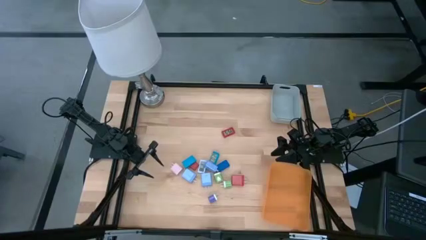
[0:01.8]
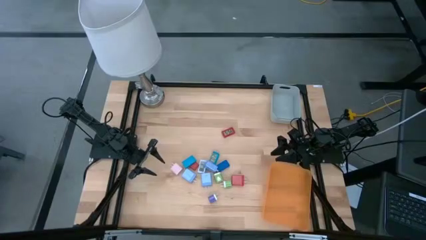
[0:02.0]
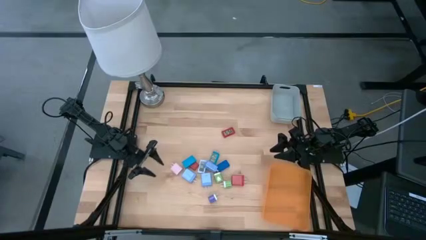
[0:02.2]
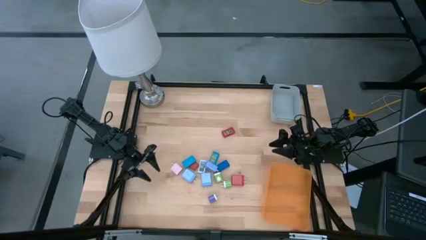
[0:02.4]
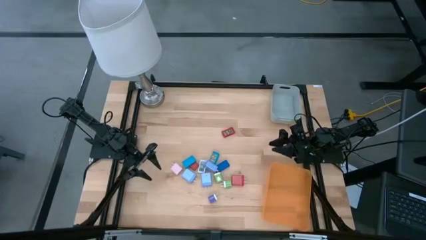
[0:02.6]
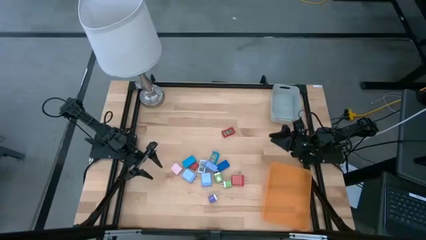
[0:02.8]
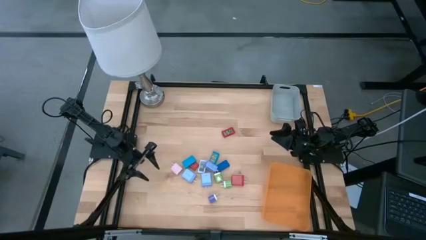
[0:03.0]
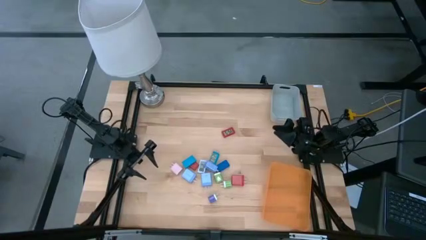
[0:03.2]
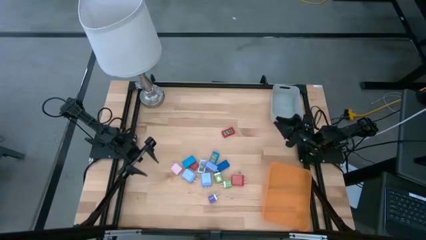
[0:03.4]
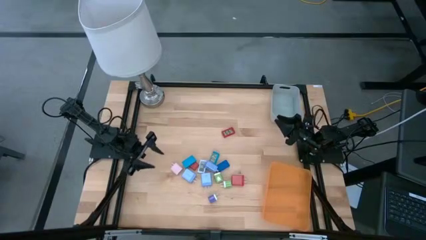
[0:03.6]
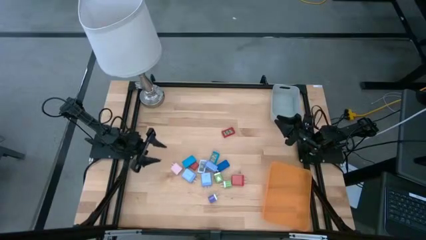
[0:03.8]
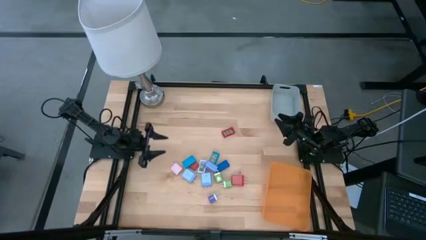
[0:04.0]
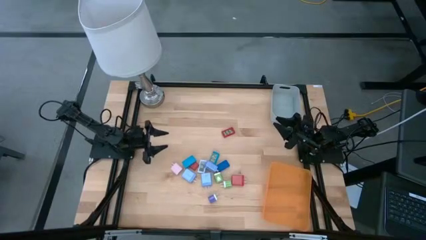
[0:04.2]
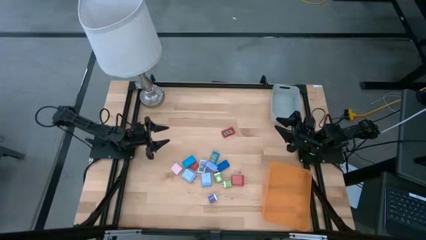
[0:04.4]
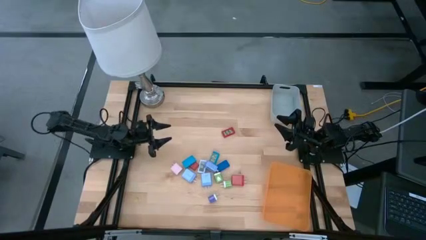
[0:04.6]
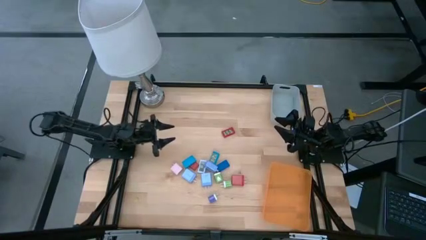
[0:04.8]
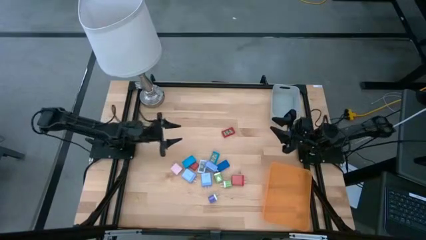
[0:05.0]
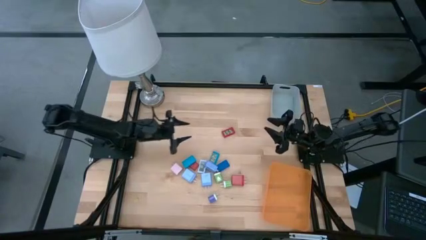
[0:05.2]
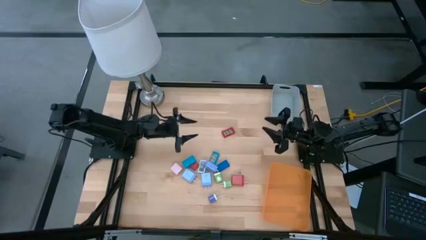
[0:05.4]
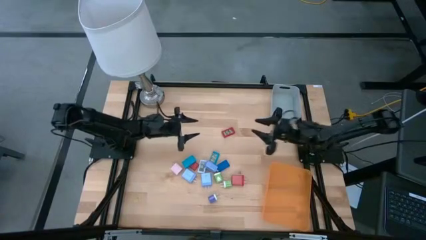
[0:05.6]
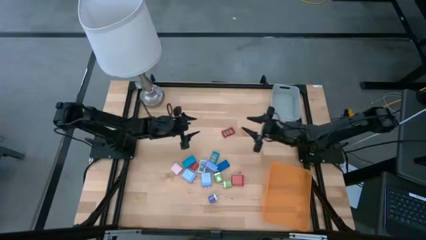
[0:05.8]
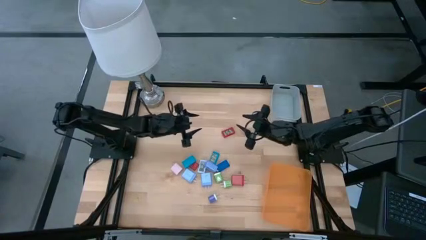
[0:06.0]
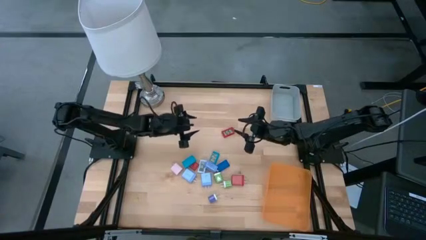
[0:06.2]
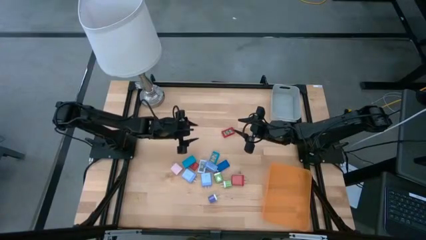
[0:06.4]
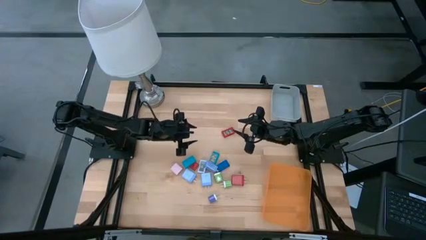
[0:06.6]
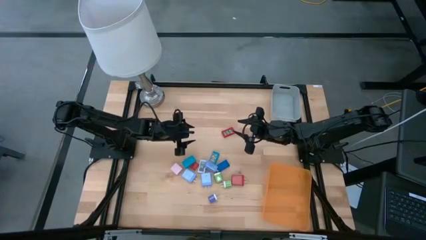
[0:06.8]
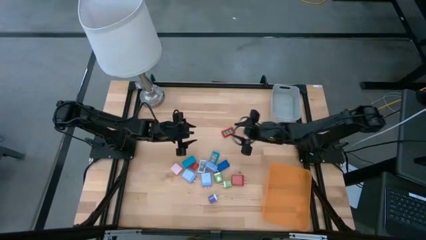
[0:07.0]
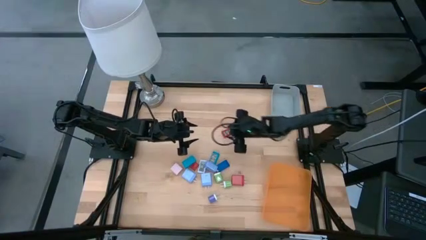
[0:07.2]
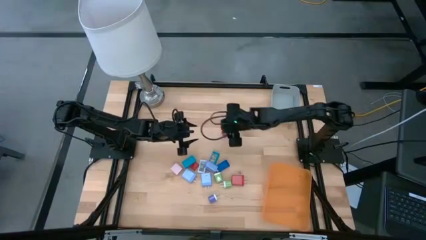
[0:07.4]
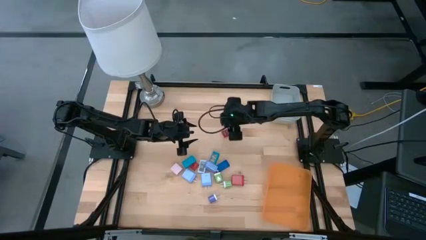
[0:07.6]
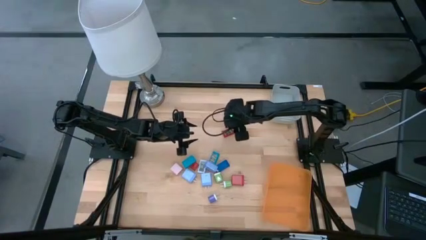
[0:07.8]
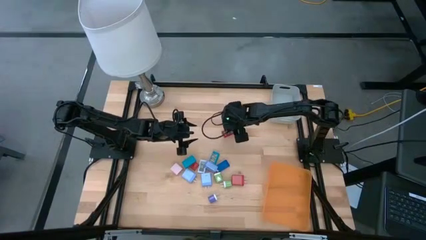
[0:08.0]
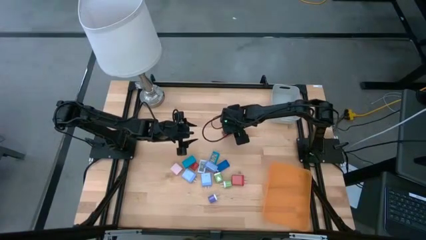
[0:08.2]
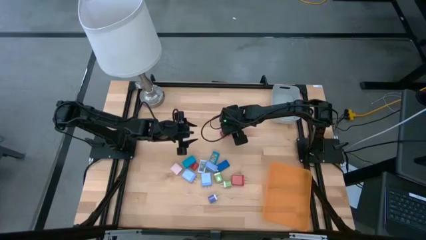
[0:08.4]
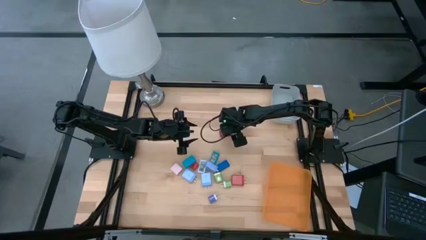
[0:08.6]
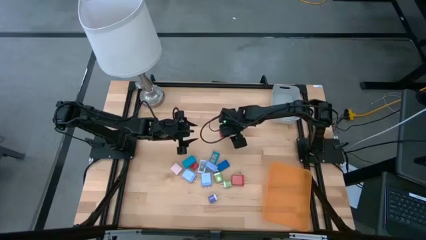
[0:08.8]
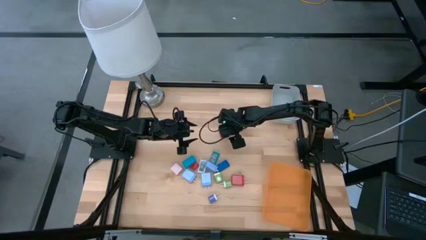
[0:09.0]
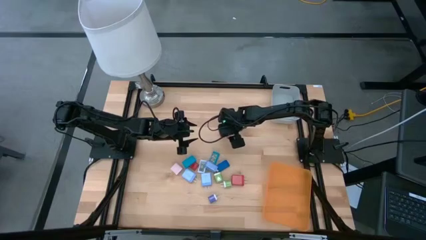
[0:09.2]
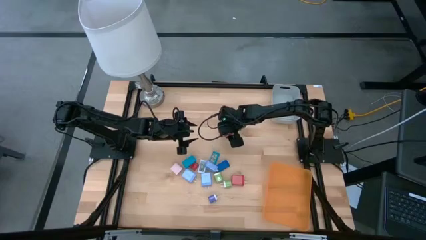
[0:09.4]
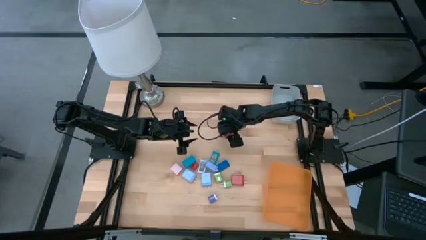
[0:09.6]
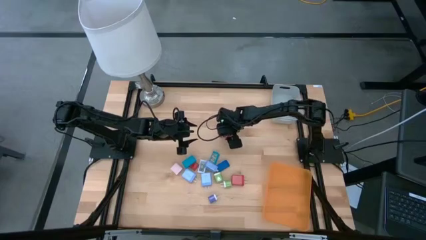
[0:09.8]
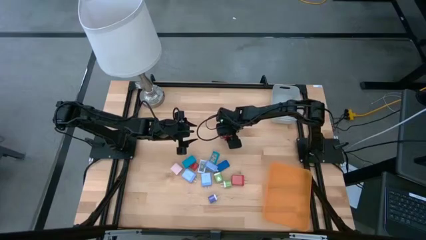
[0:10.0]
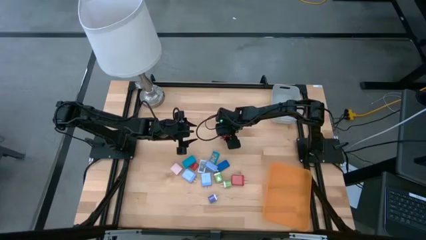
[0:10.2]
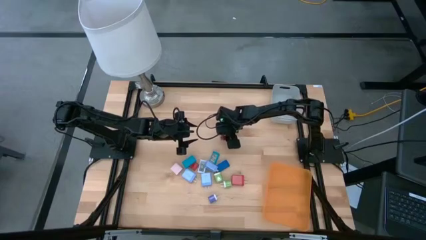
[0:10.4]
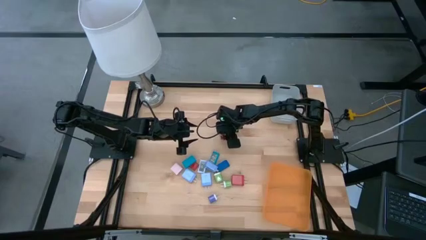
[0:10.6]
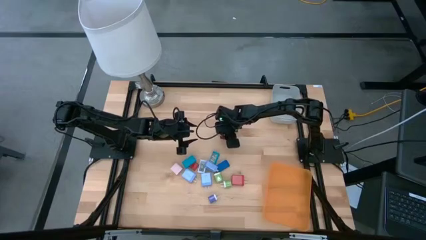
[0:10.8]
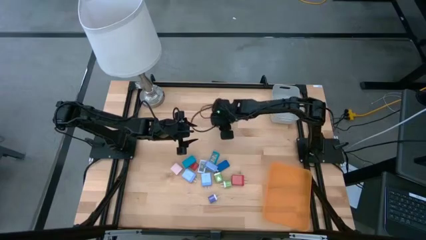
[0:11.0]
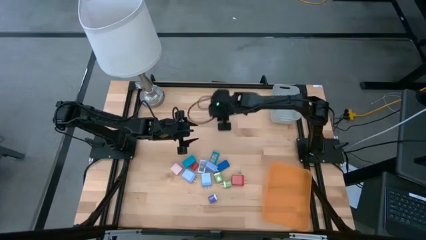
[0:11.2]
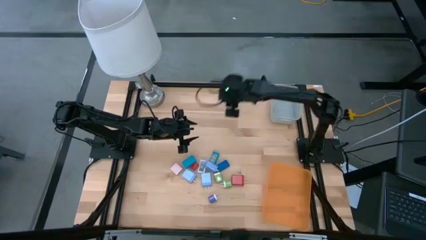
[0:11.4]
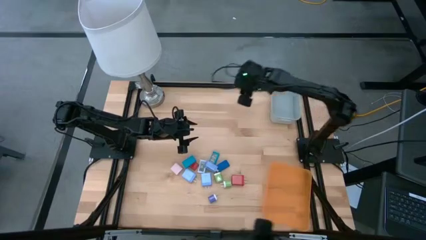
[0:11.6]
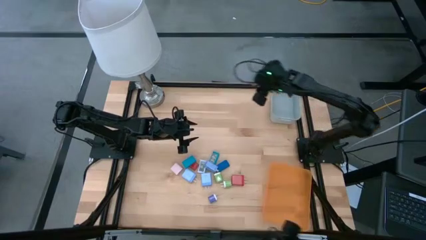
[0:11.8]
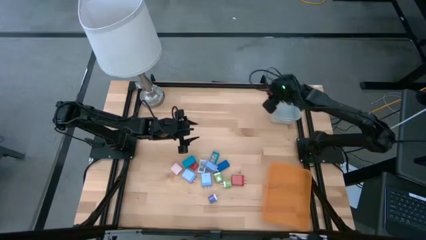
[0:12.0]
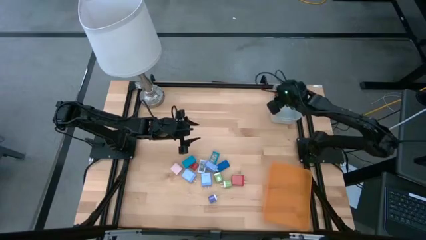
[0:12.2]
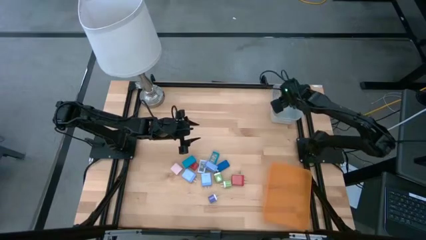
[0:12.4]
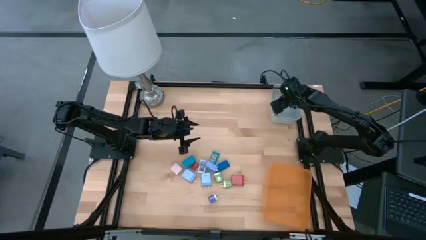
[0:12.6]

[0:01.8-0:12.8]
Task: Pick & Place Office items
Put the top red digital clock into the gray bin

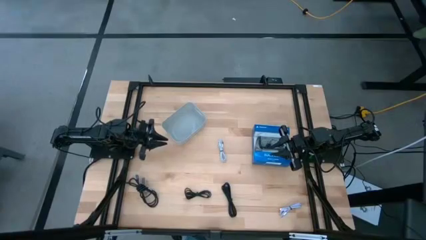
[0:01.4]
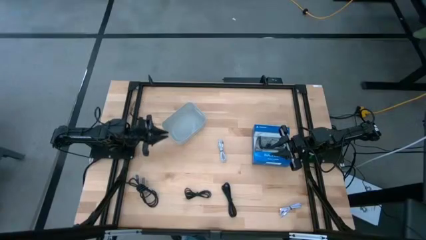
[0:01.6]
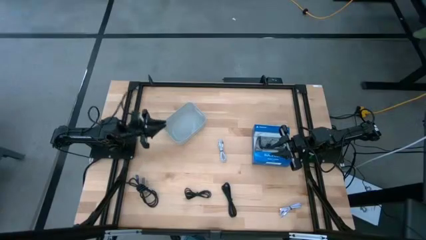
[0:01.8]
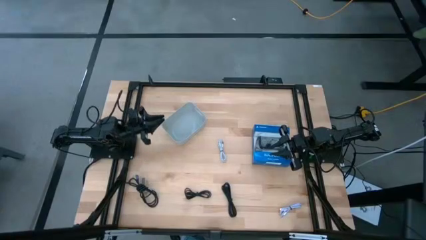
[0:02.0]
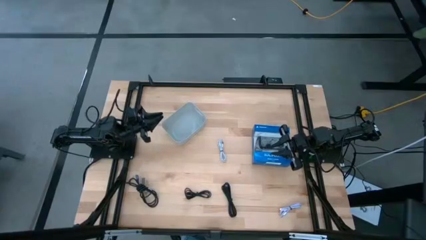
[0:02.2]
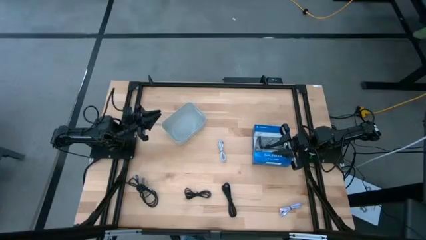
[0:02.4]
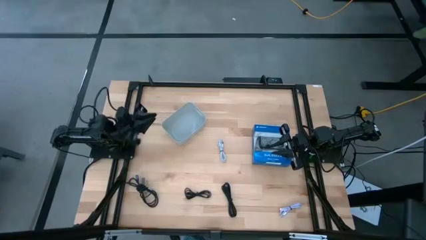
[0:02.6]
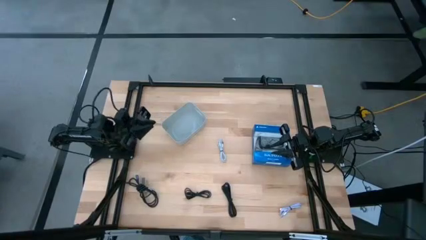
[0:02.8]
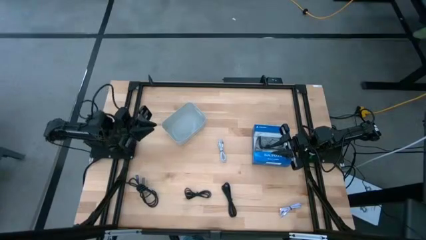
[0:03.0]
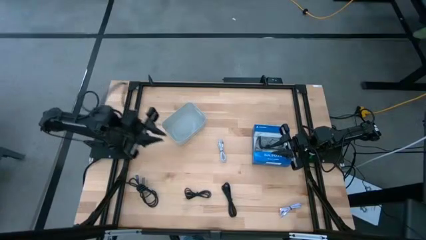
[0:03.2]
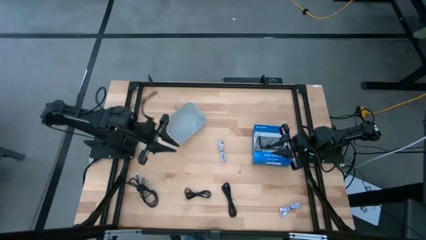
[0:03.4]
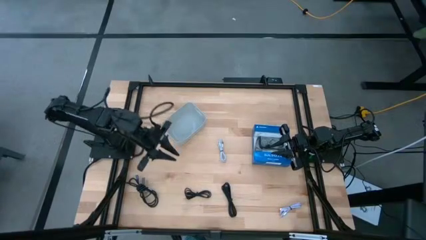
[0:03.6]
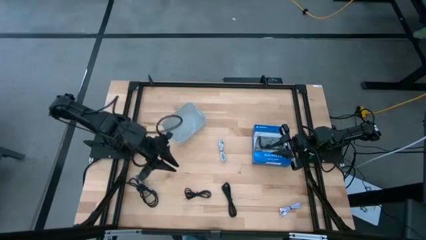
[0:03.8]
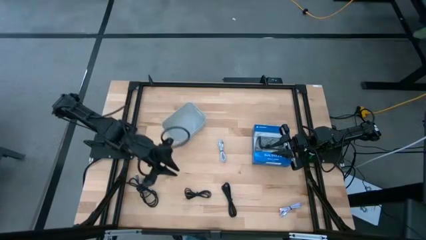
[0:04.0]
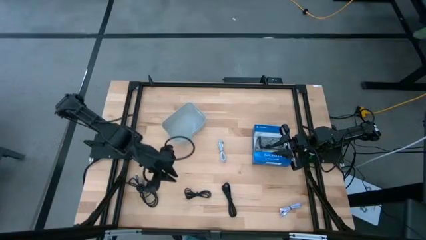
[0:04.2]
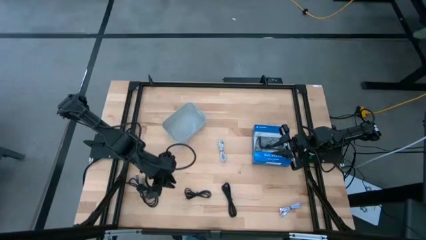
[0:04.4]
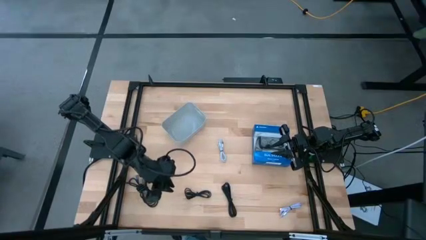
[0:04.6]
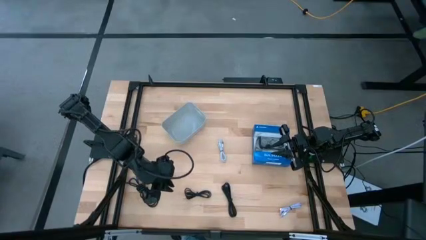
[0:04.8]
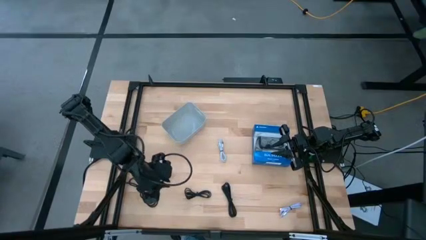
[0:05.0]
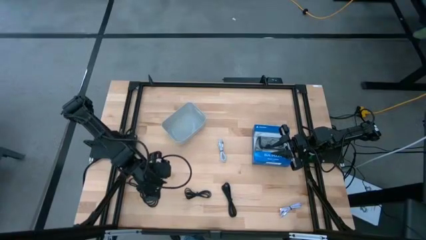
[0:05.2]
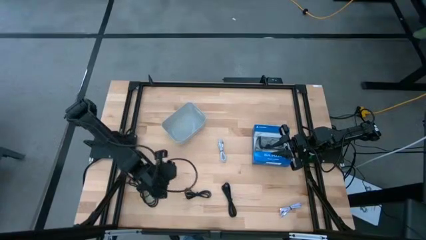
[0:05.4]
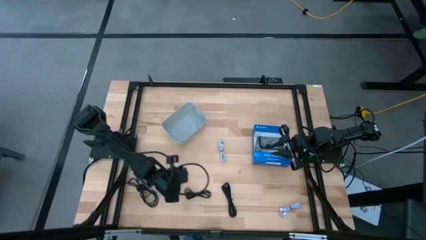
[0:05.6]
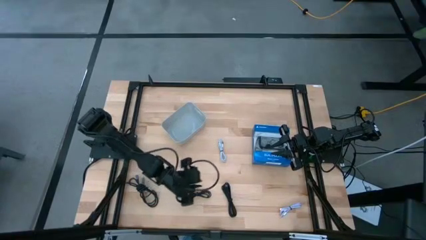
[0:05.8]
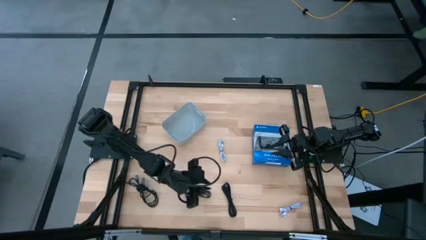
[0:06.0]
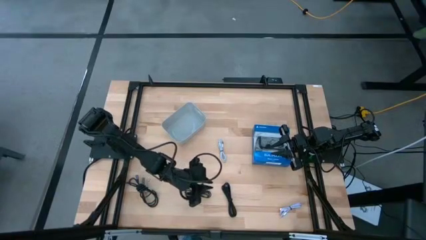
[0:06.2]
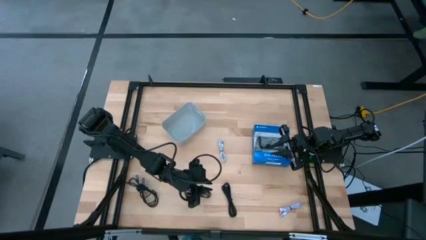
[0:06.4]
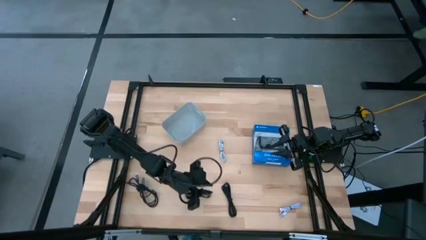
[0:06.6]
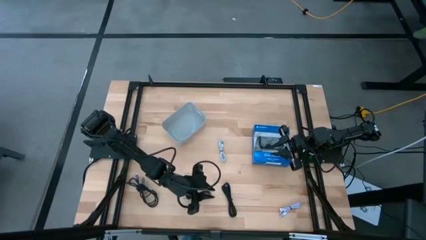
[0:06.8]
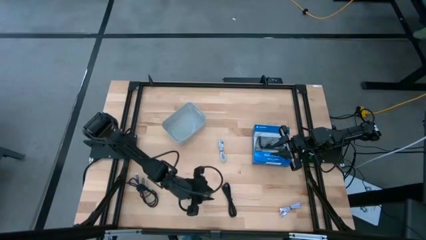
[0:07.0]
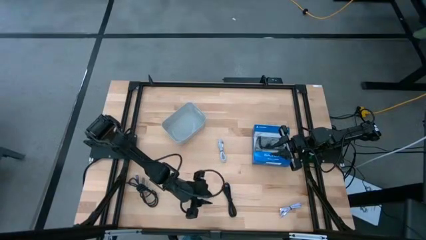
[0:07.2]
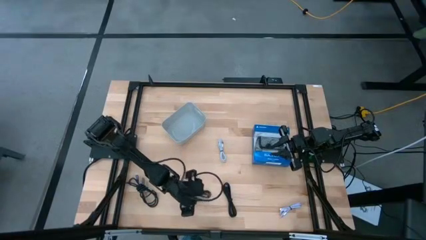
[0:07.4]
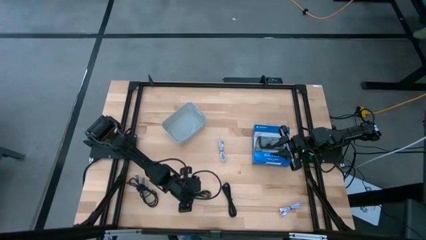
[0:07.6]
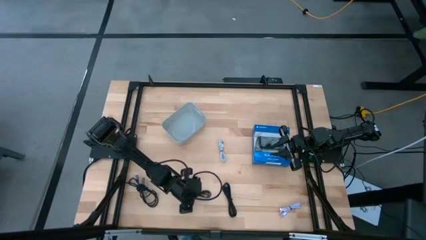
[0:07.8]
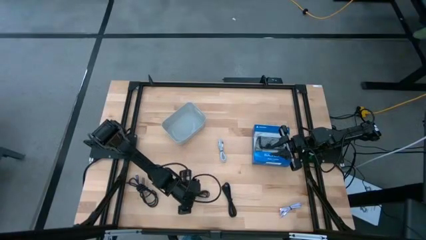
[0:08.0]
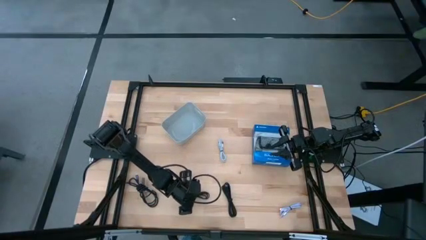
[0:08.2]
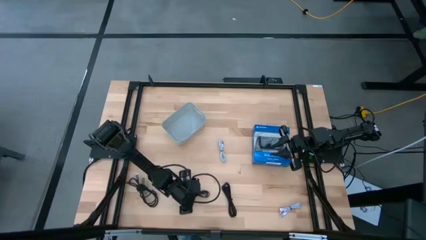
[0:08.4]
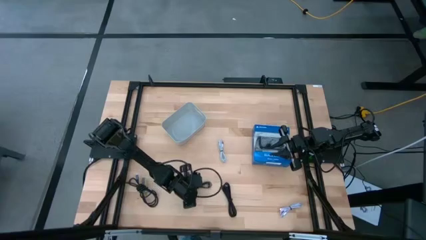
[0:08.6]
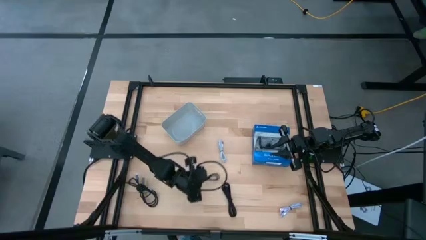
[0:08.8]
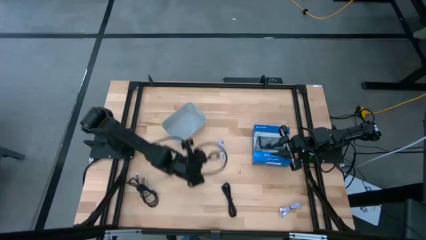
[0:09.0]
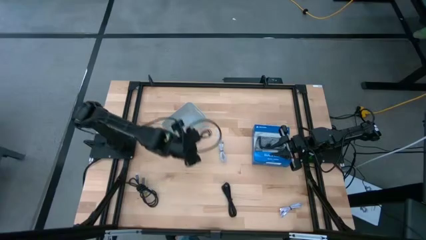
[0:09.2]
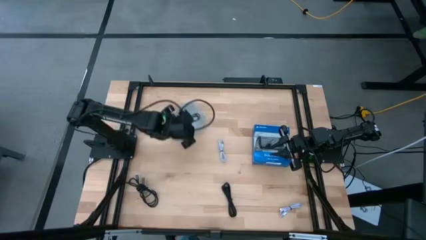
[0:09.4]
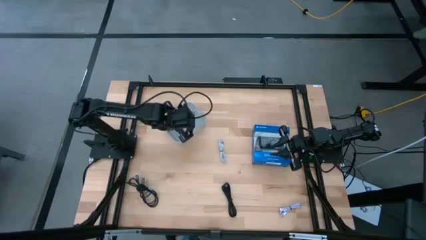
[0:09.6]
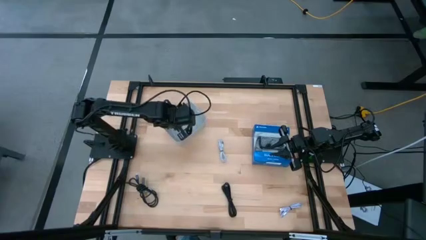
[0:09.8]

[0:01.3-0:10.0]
Task: Pick and place USB-C Cables
Put the left black charger cable into the white bin
